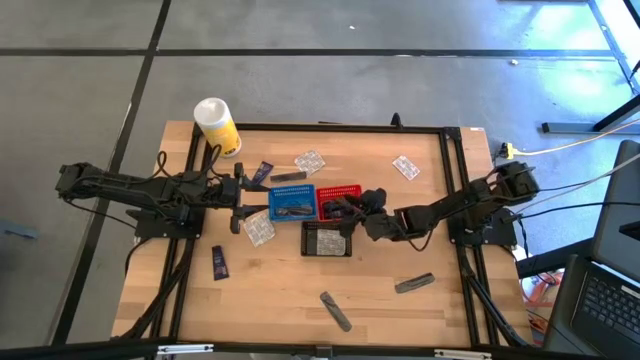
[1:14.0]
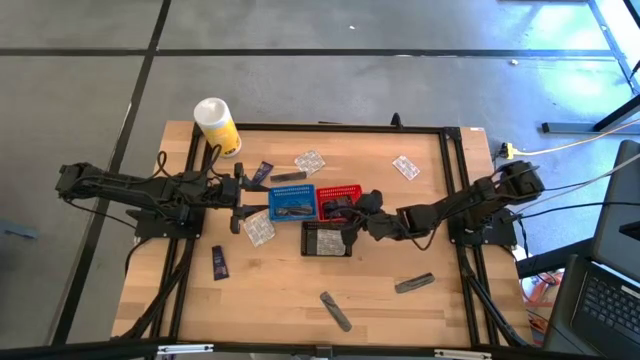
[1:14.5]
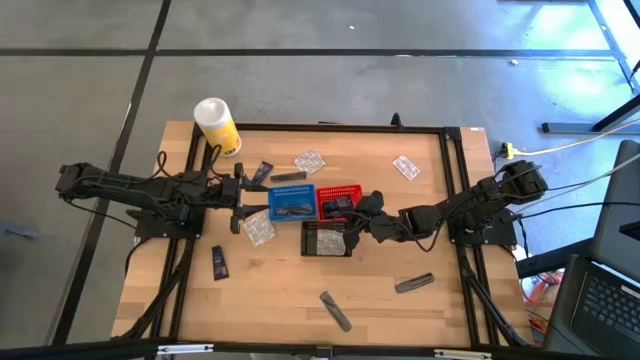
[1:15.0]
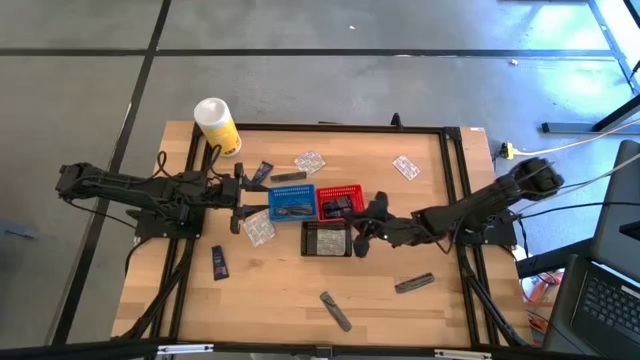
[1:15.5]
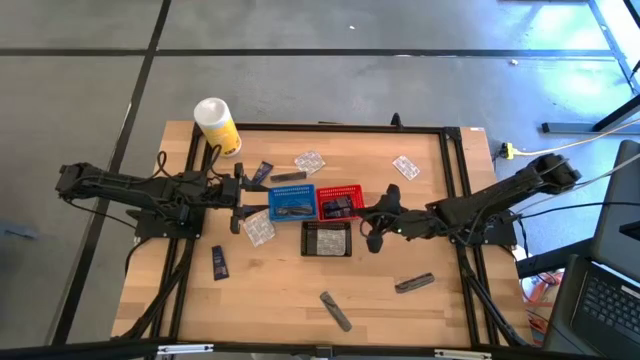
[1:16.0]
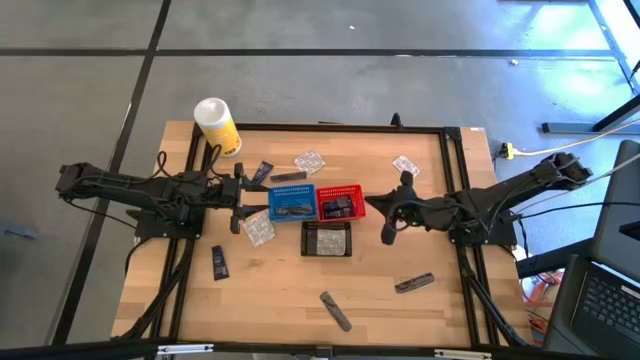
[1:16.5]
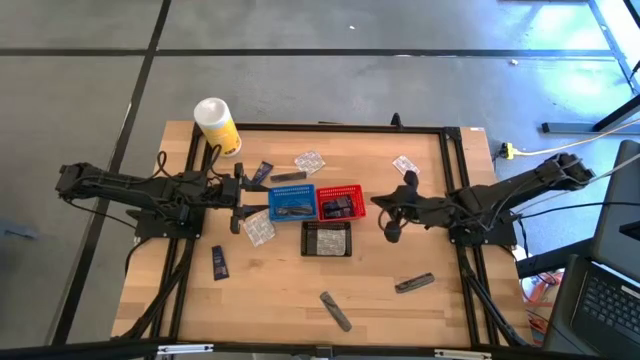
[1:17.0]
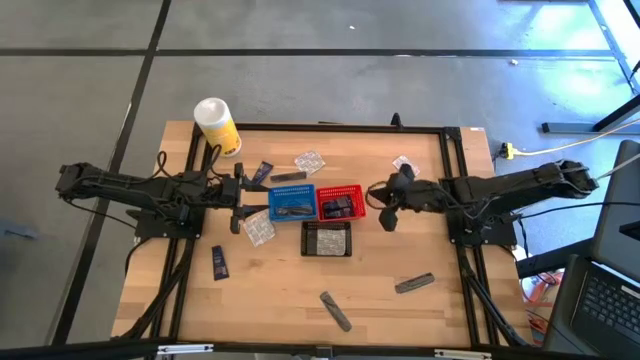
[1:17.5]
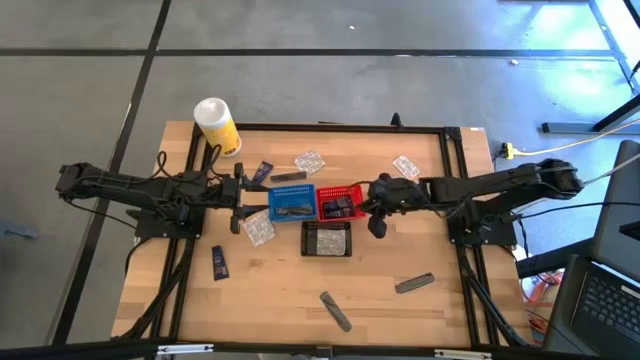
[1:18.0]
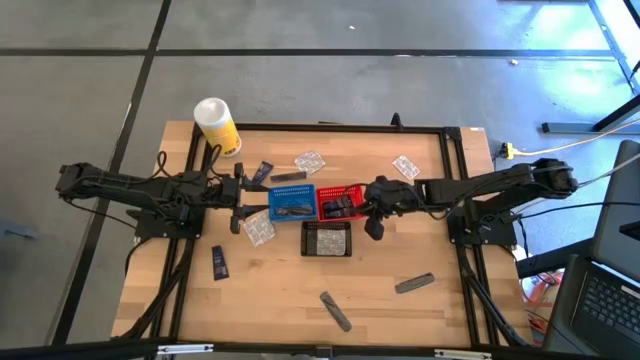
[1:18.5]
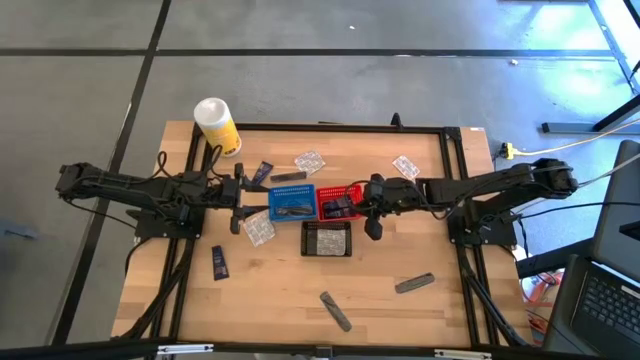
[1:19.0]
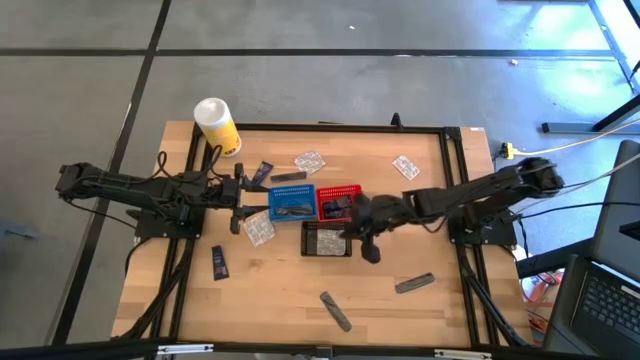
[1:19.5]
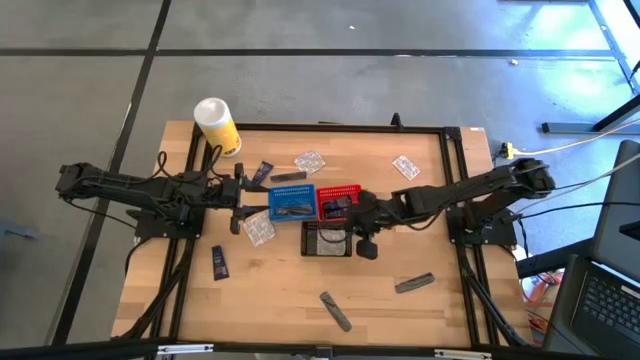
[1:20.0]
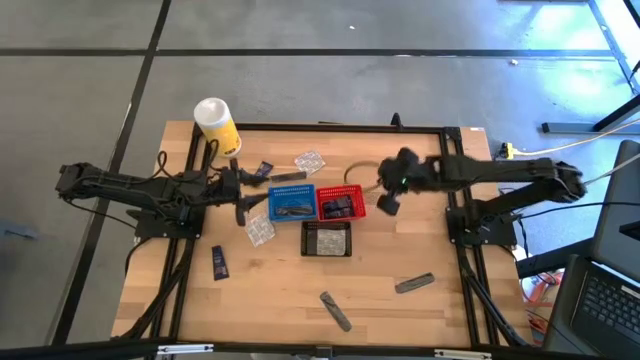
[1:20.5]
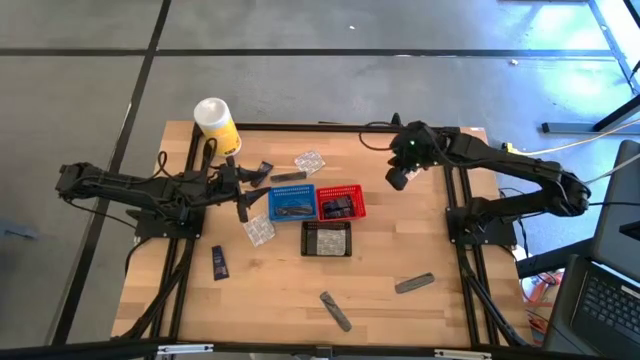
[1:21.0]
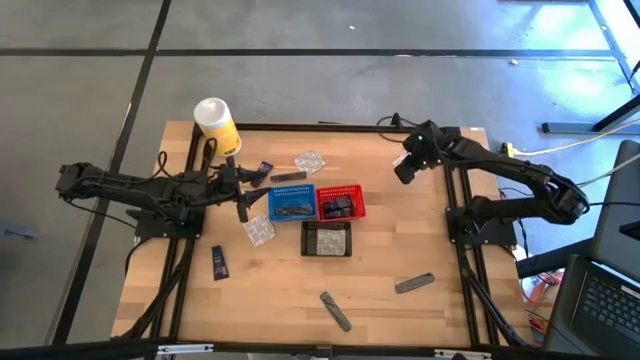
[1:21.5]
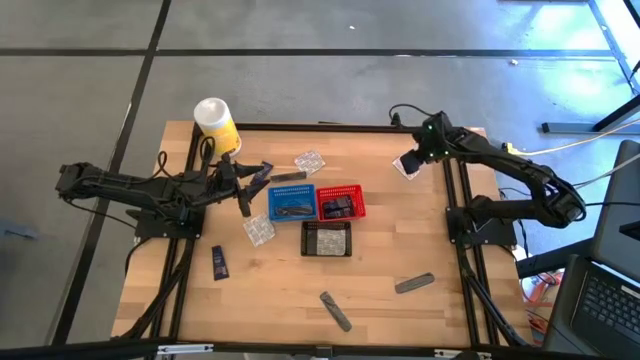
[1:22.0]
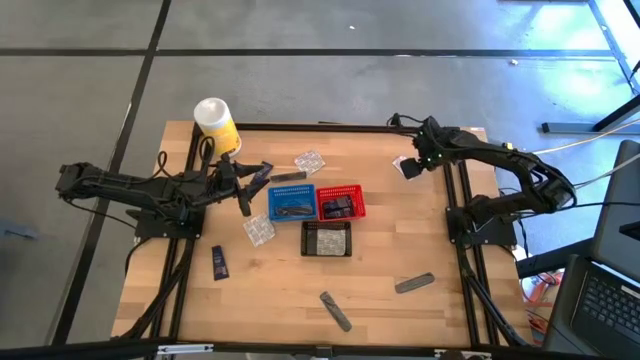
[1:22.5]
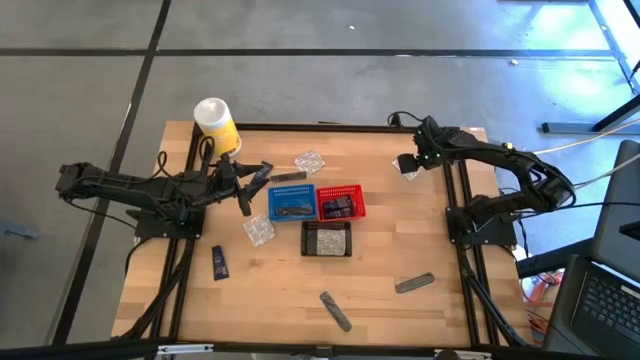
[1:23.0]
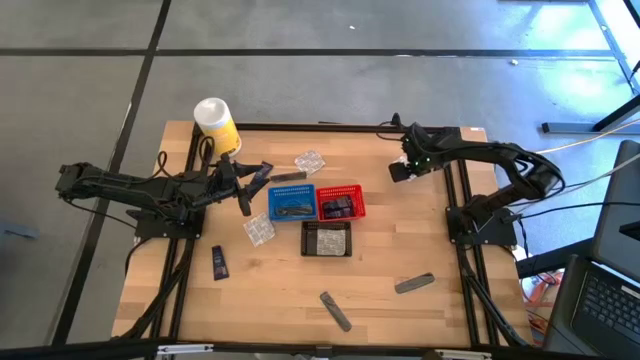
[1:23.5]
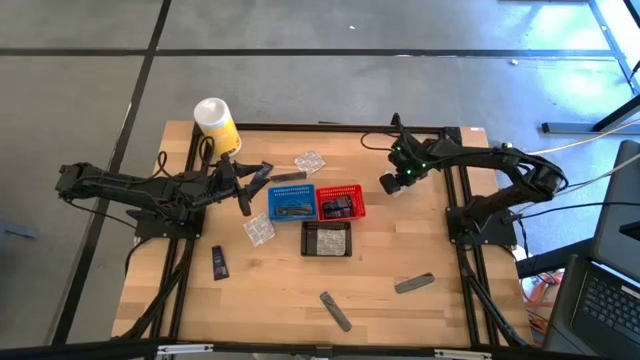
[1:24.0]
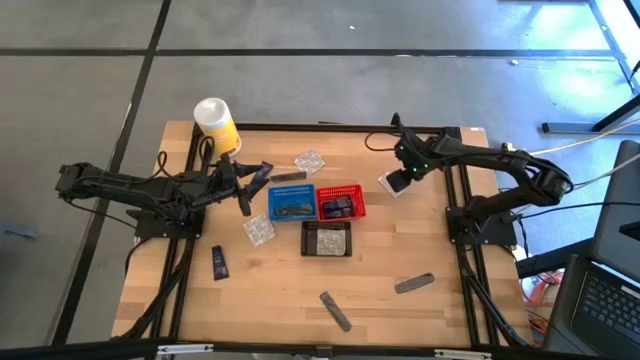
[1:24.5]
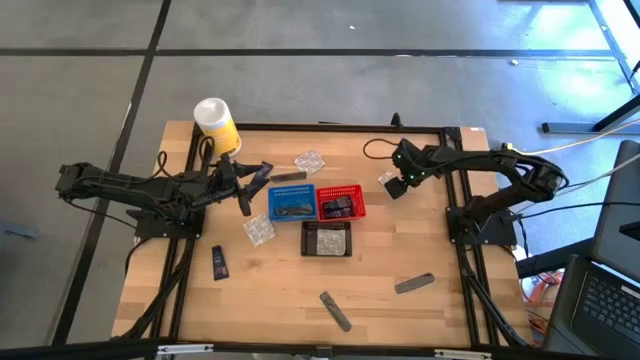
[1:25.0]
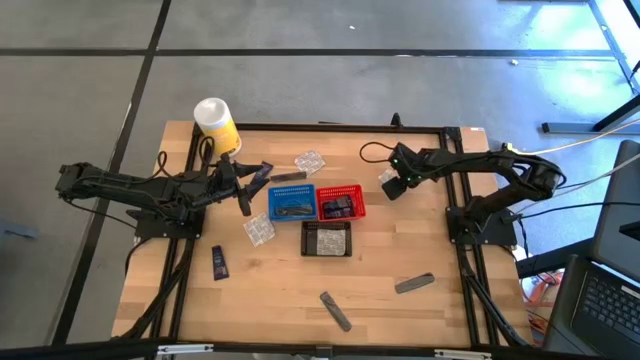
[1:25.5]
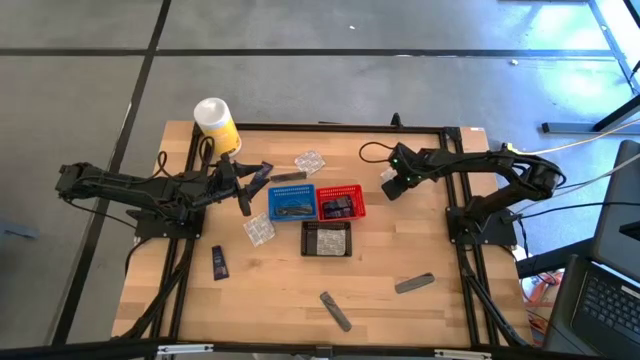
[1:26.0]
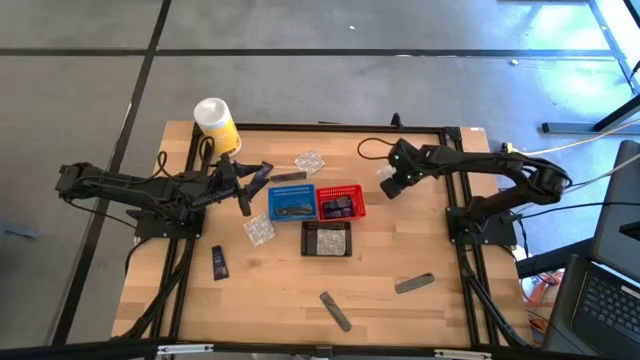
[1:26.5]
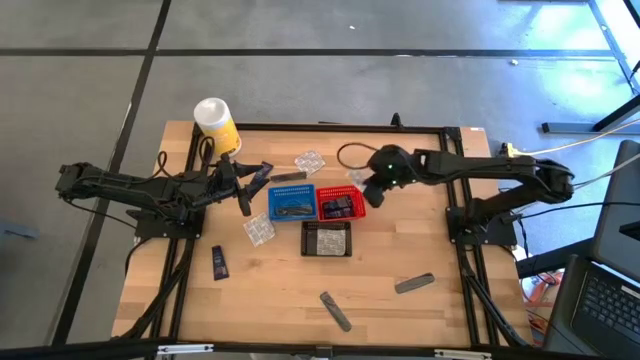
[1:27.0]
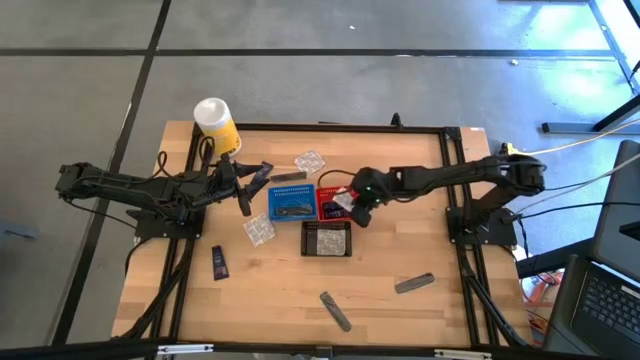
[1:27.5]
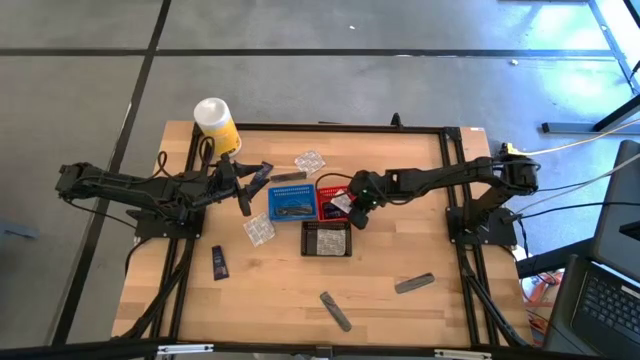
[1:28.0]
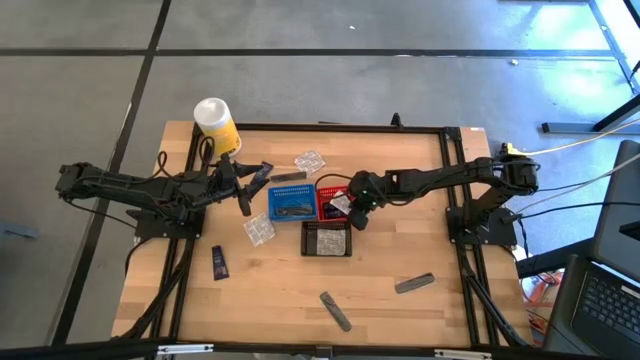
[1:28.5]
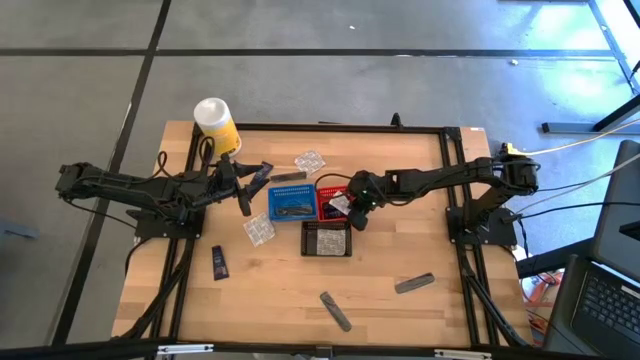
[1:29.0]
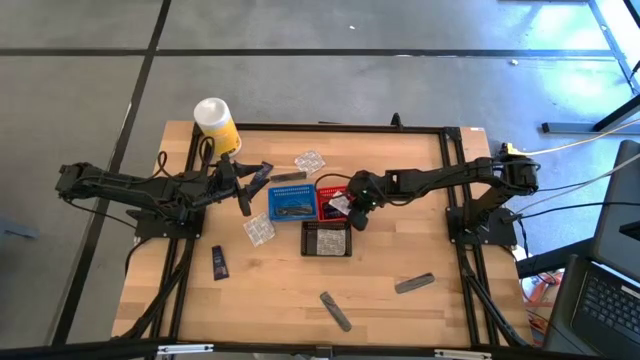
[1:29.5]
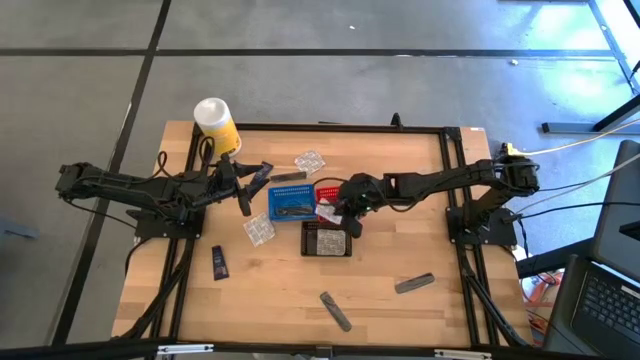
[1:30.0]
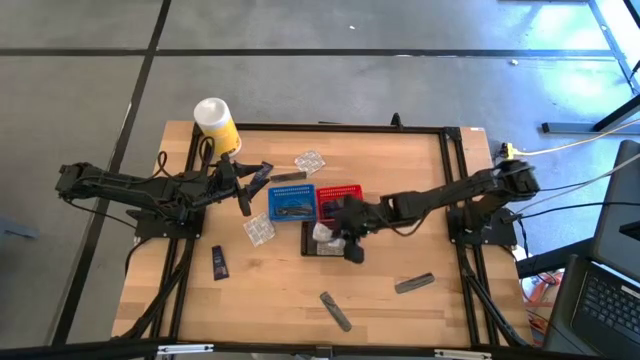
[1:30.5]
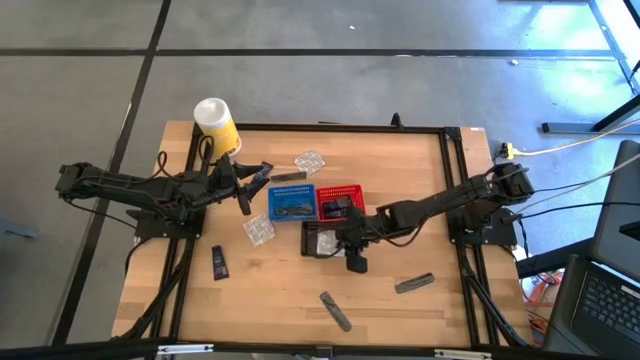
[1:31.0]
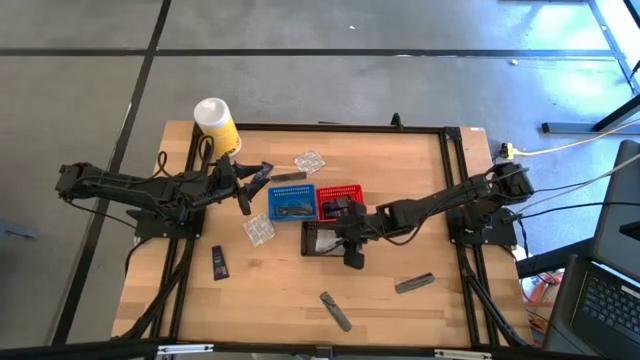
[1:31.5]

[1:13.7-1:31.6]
Task: Pick & Place Travel size toiletries
Put the white bandage into the black bin

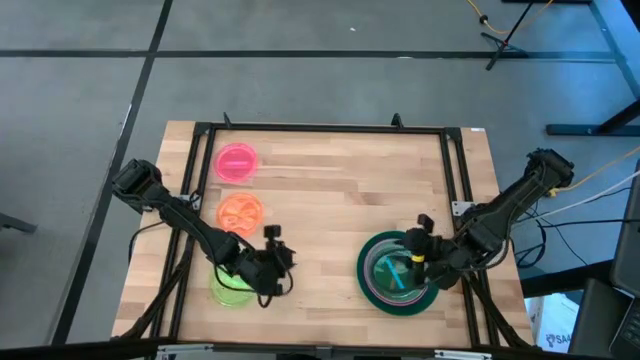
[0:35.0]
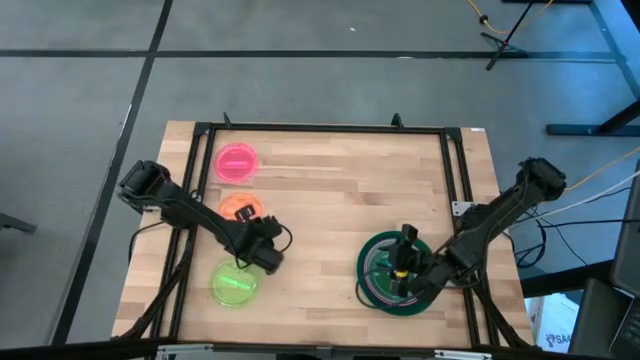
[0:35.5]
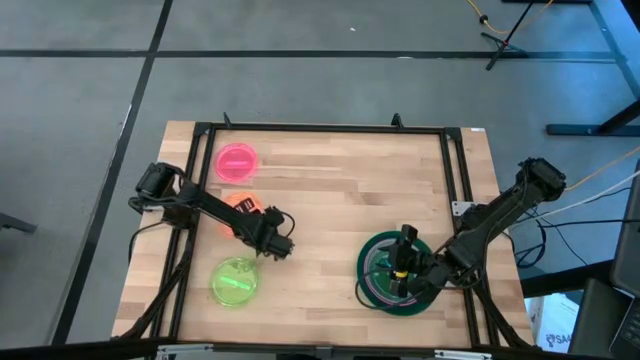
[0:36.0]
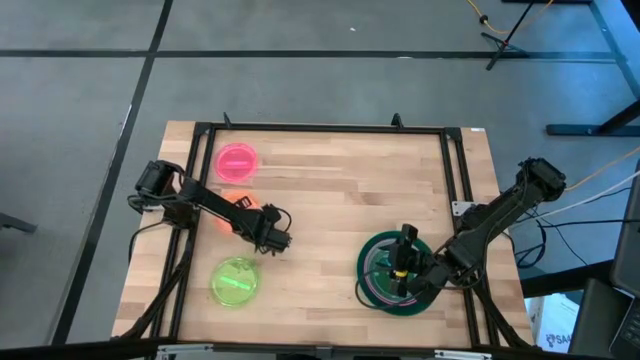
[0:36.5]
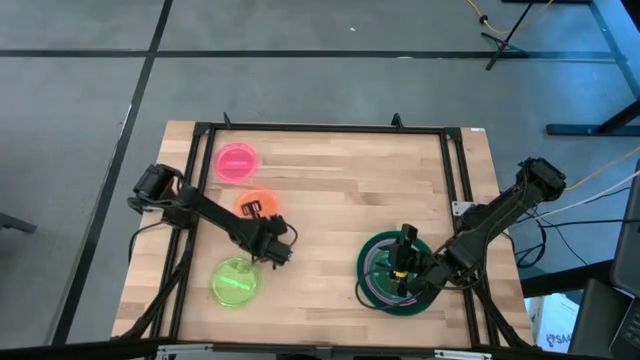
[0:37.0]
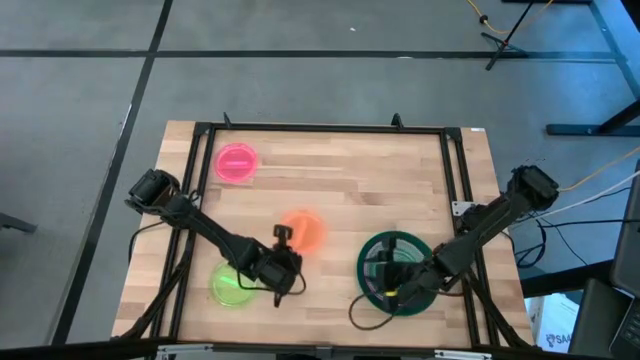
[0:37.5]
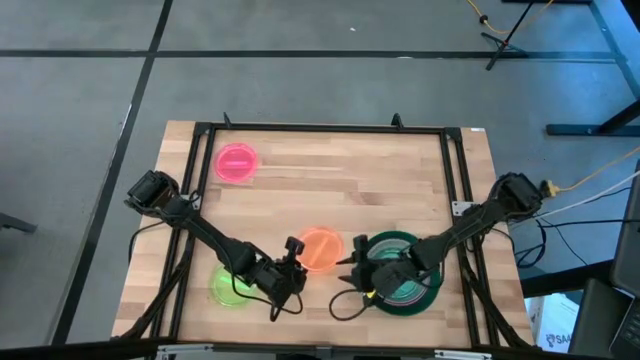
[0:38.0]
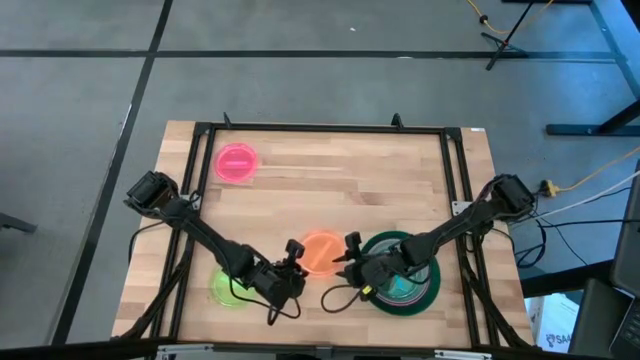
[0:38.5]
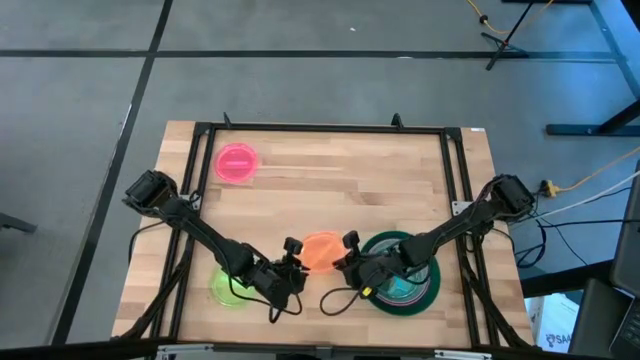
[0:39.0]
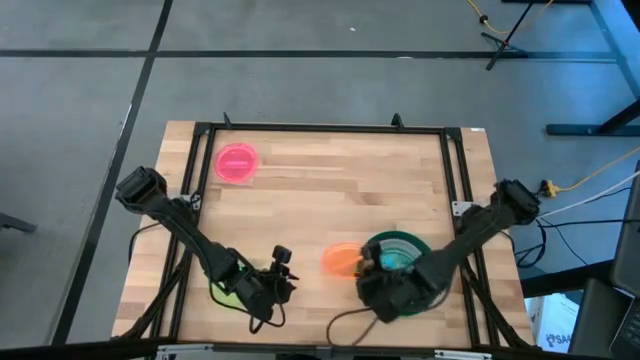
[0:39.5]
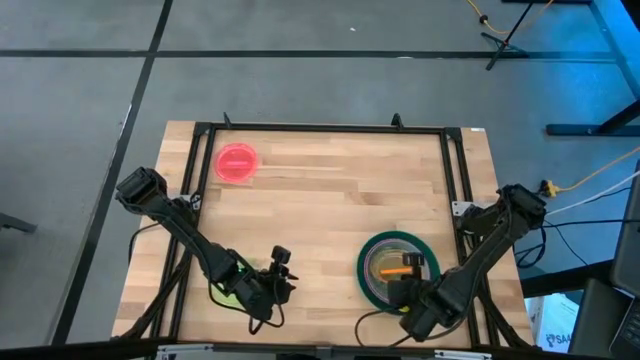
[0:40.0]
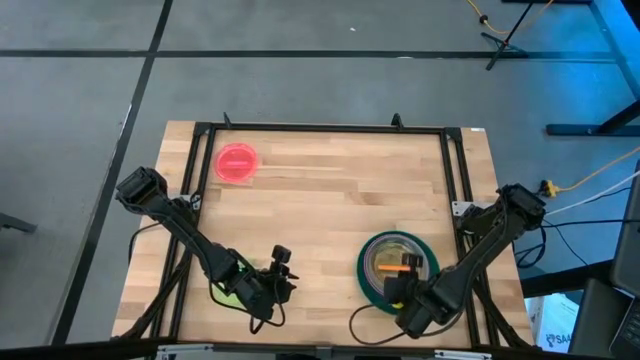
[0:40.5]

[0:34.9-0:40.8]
Task: Stack plastic plates
Stack the orange plate on the light blue plate
